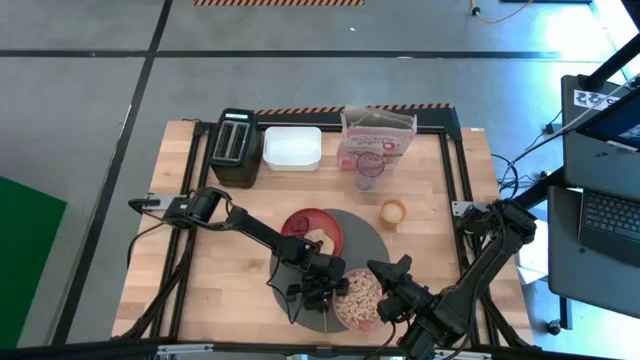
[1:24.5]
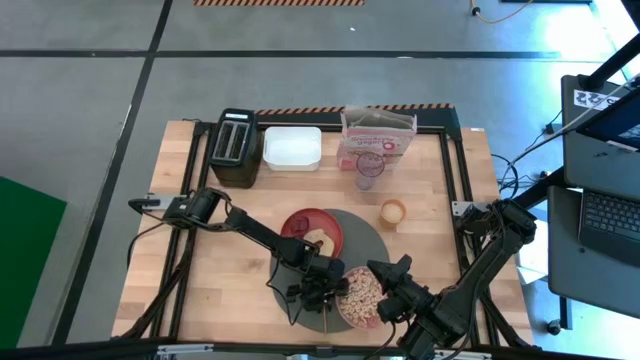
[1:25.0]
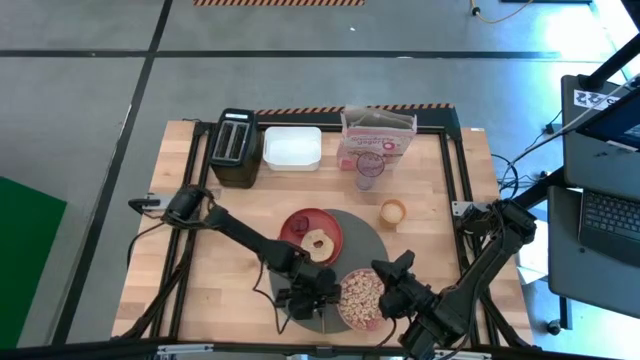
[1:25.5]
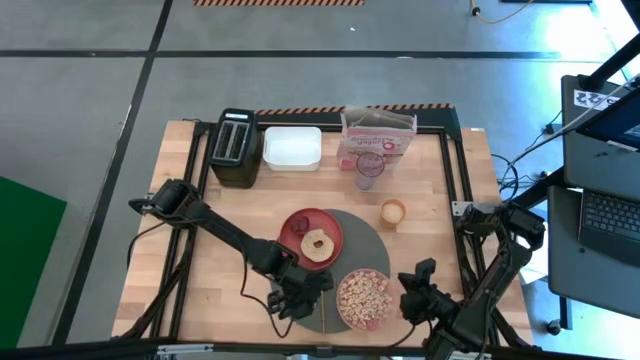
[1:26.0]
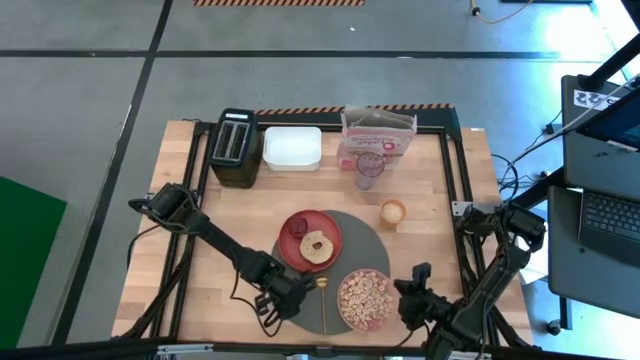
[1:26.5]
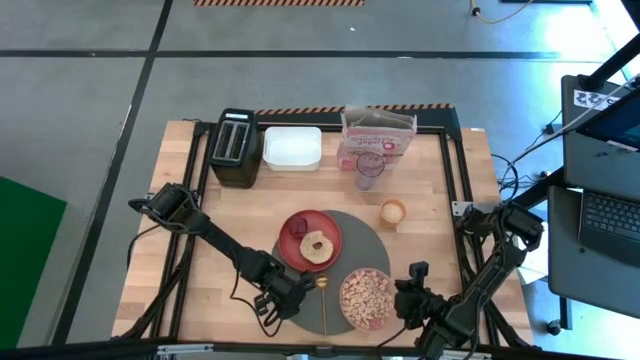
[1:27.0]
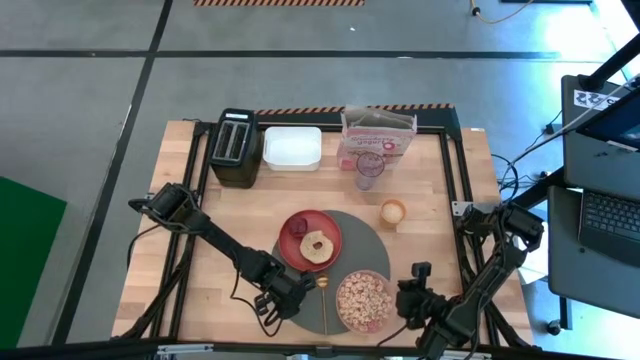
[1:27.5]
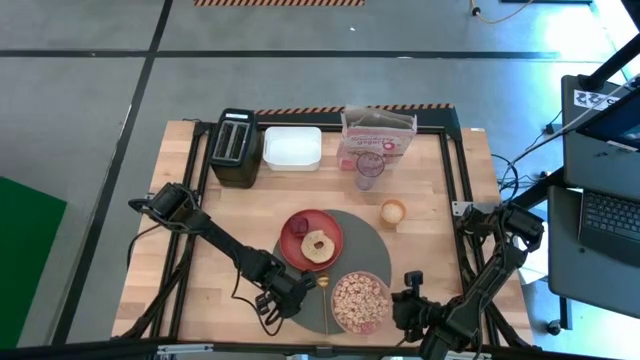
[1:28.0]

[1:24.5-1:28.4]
Task: Arrange a breakfast setting
Adjust the pink bowl on the gray place mat

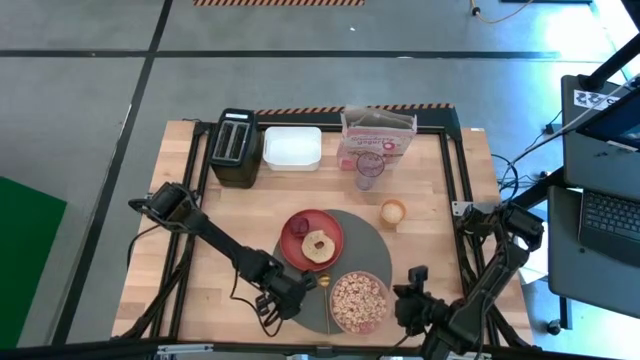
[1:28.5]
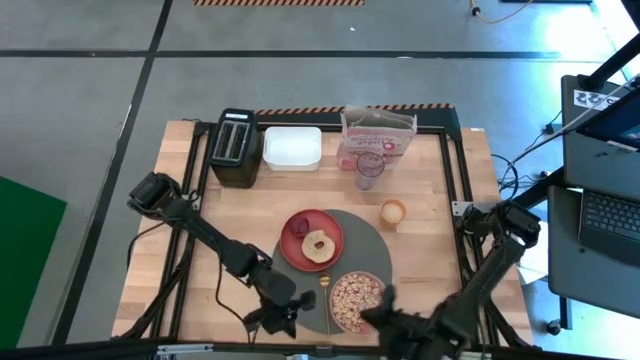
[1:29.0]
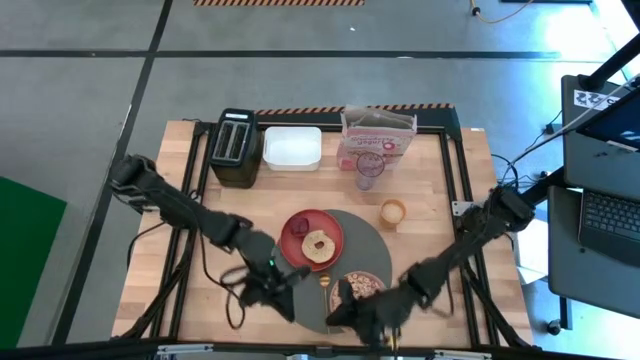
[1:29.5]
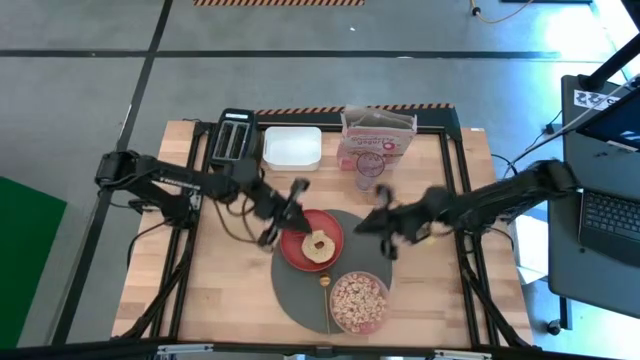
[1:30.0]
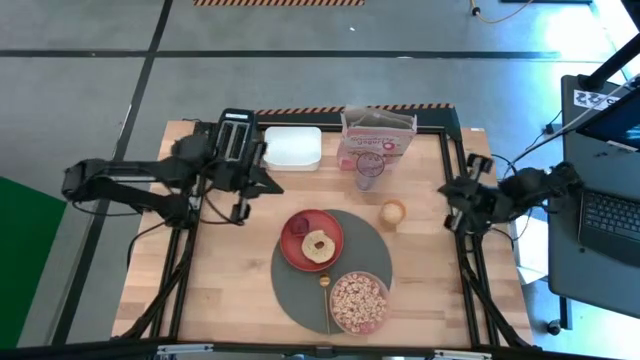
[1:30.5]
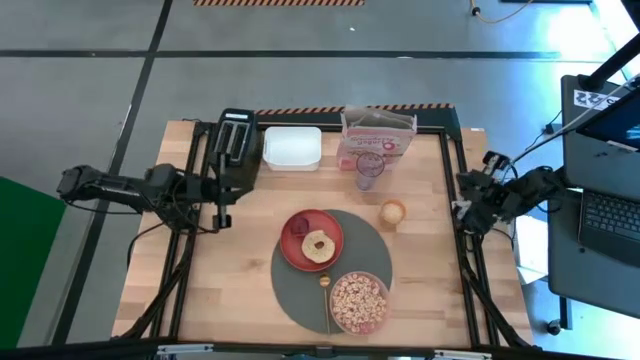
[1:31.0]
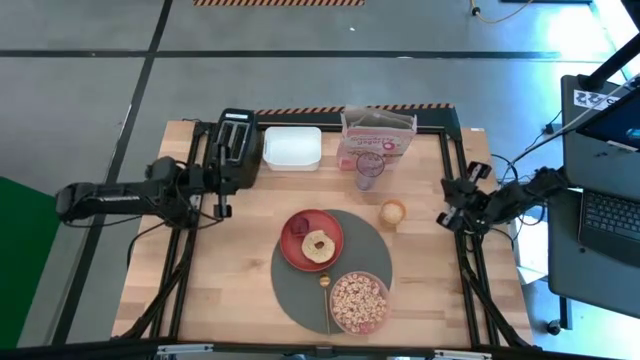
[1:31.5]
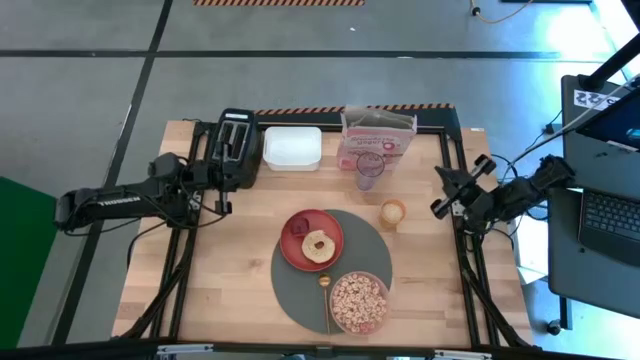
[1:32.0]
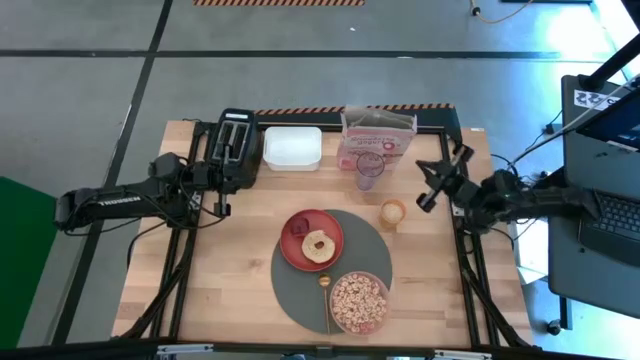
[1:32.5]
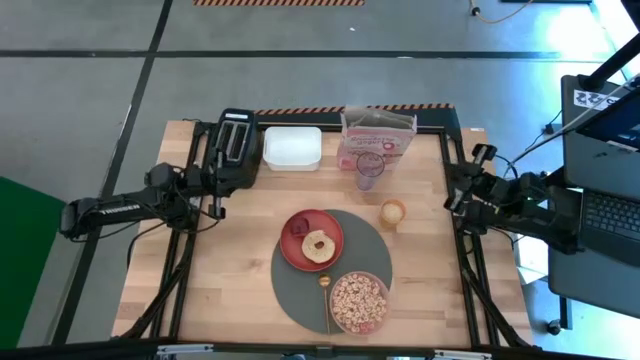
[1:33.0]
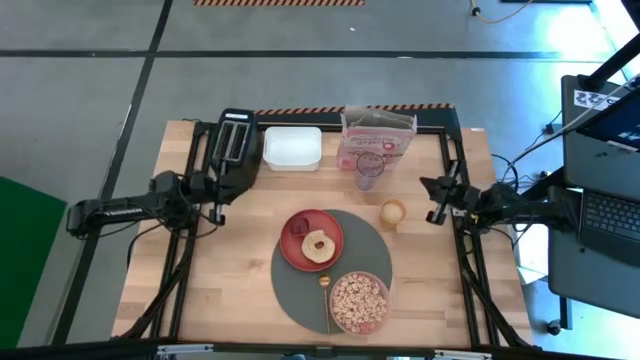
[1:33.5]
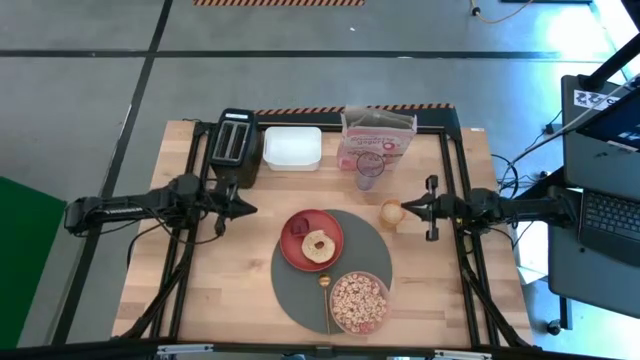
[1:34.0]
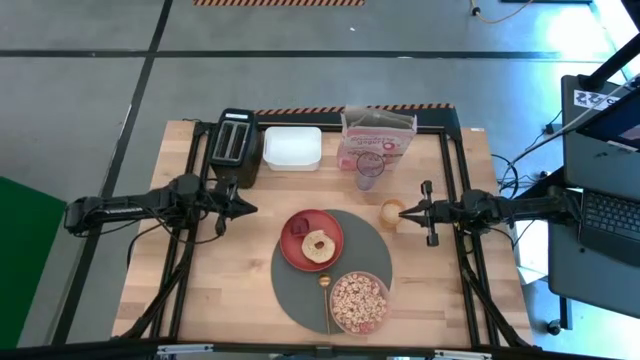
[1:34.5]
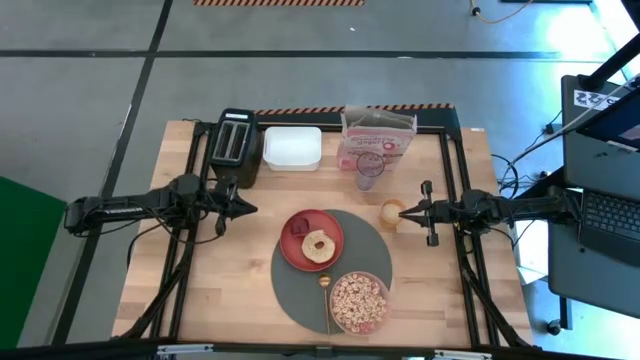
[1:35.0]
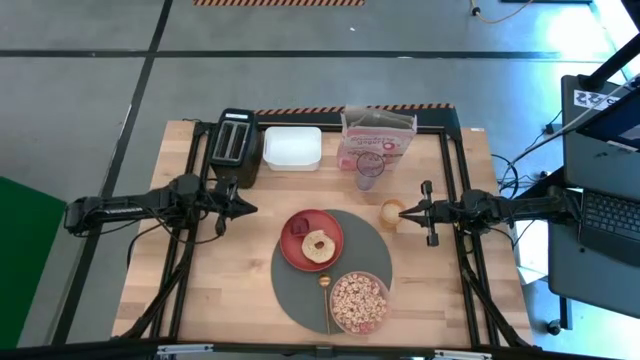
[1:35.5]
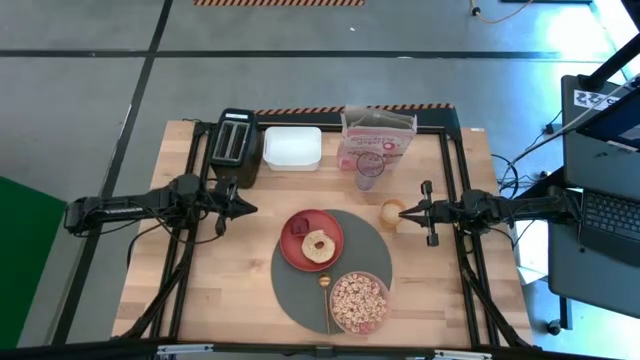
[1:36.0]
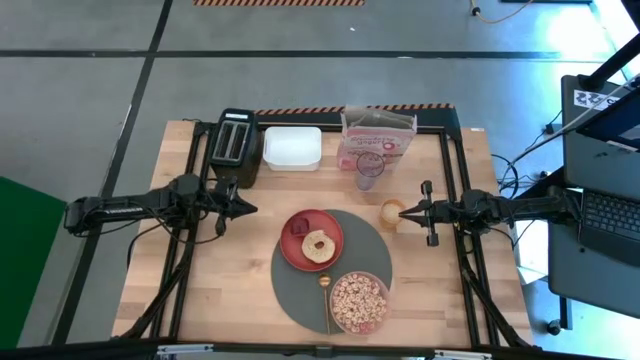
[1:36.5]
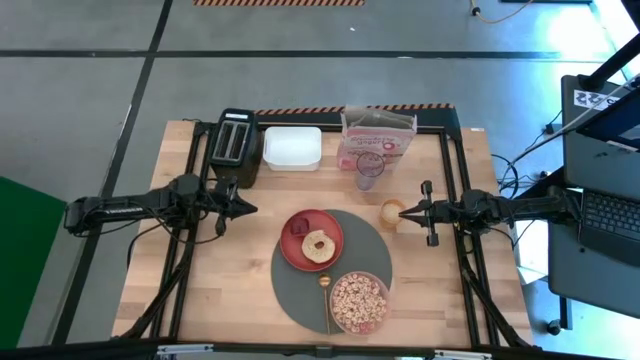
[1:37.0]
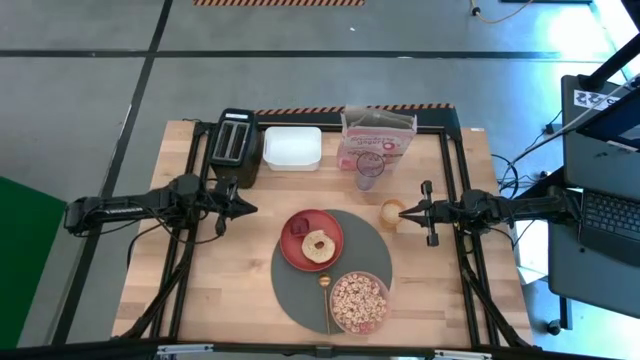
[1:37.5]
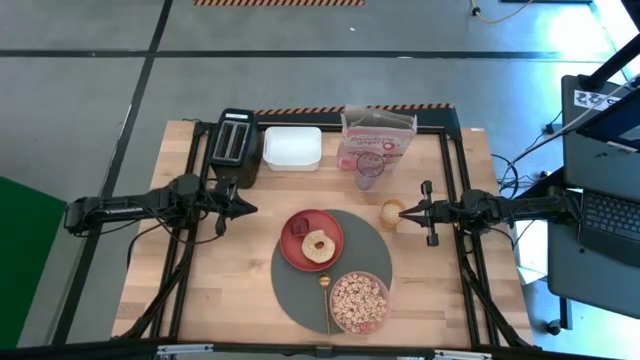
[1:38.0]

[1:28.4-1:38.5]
Return to Home Position

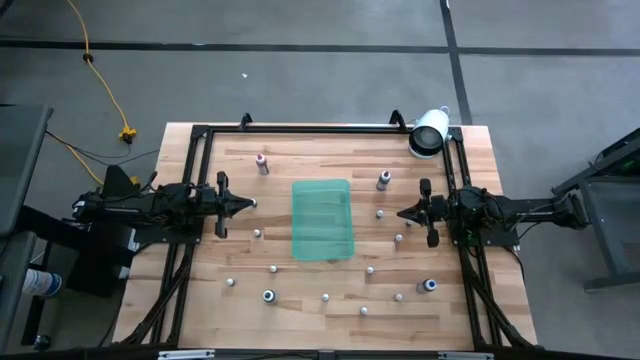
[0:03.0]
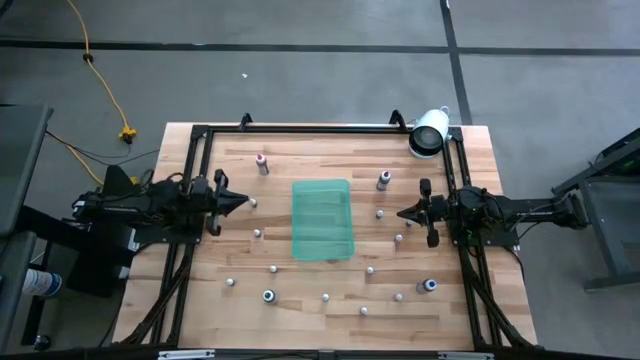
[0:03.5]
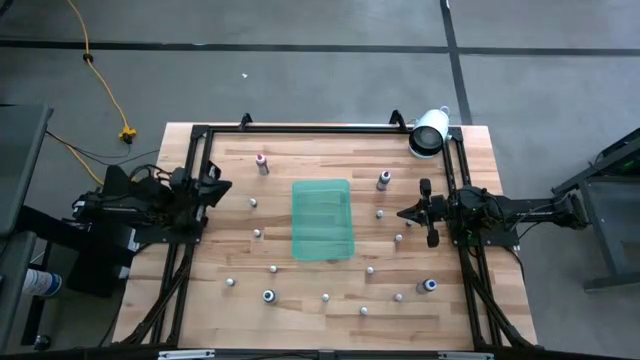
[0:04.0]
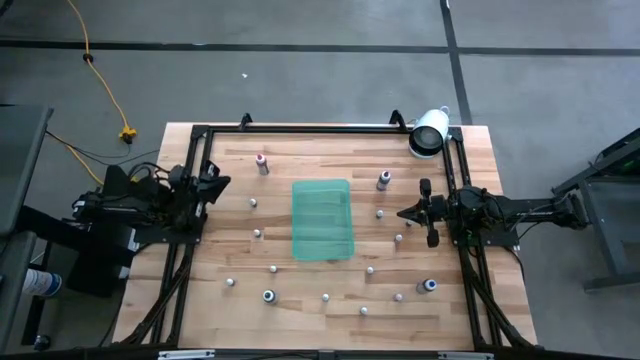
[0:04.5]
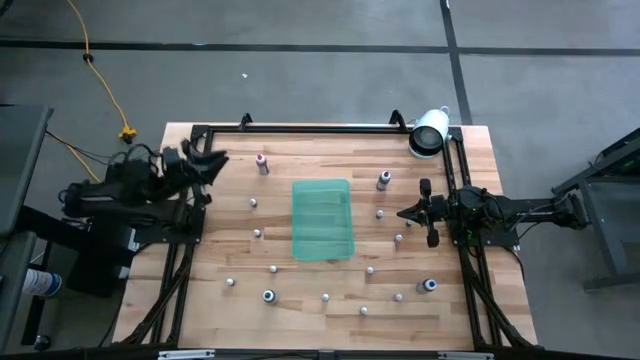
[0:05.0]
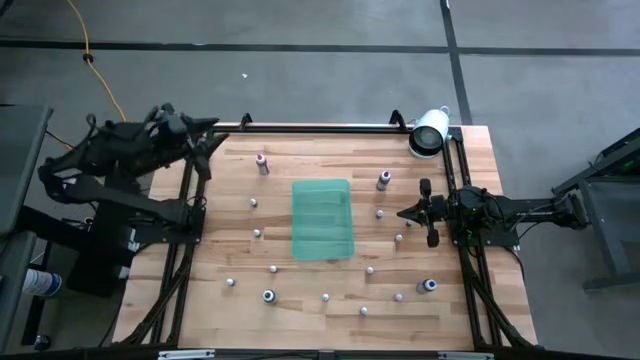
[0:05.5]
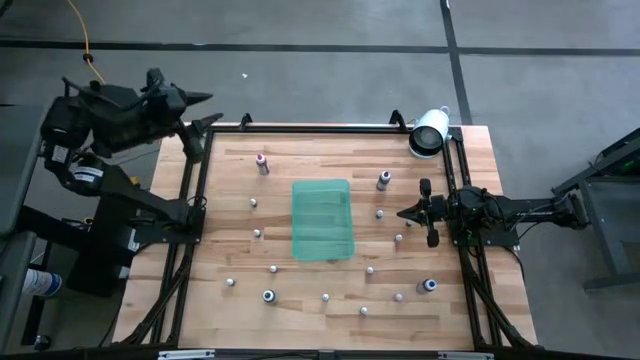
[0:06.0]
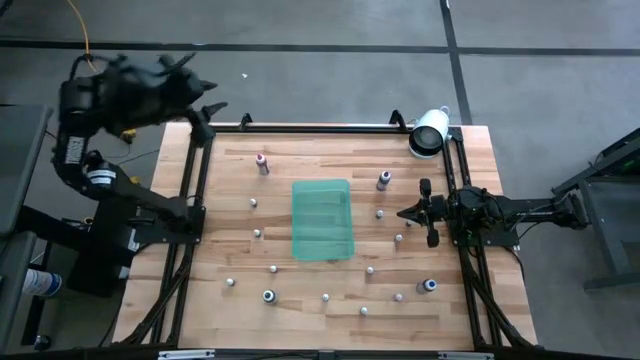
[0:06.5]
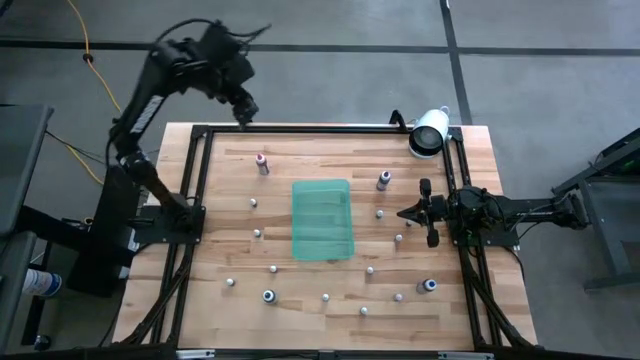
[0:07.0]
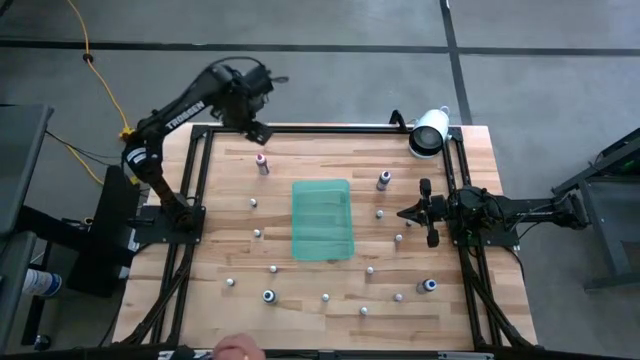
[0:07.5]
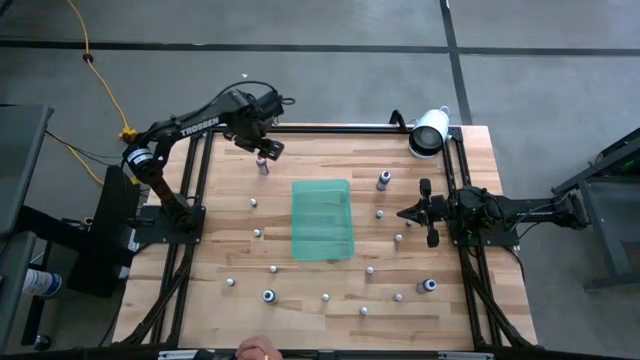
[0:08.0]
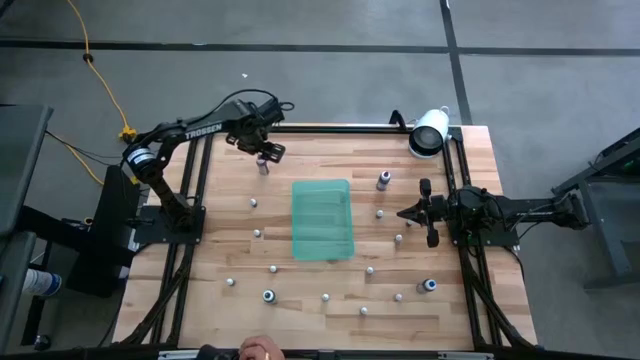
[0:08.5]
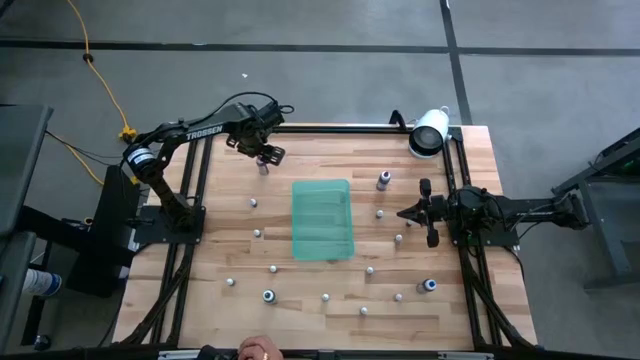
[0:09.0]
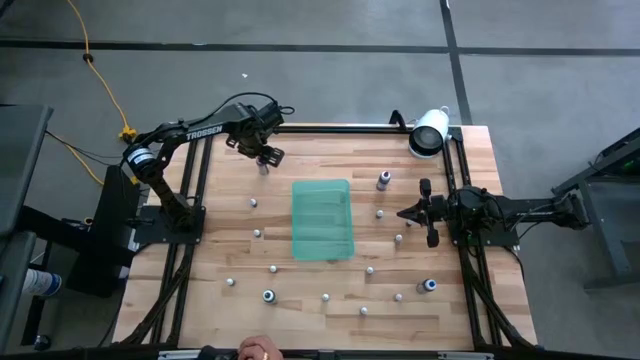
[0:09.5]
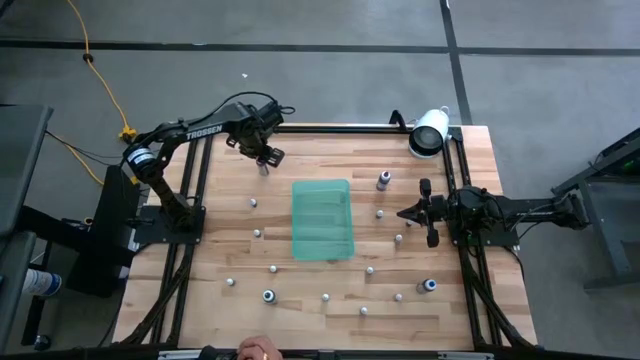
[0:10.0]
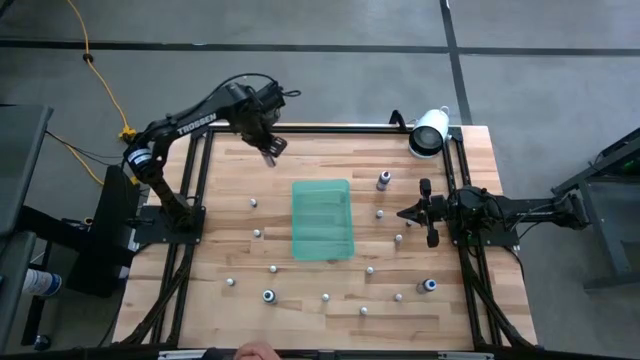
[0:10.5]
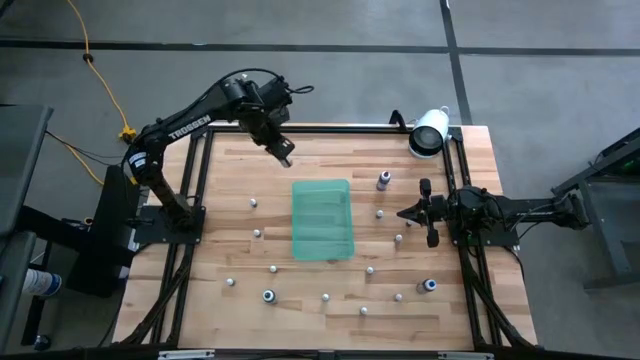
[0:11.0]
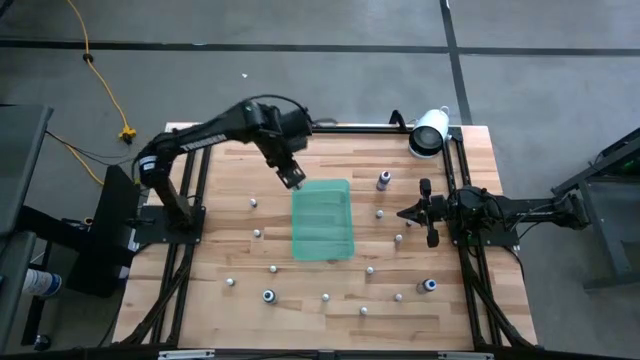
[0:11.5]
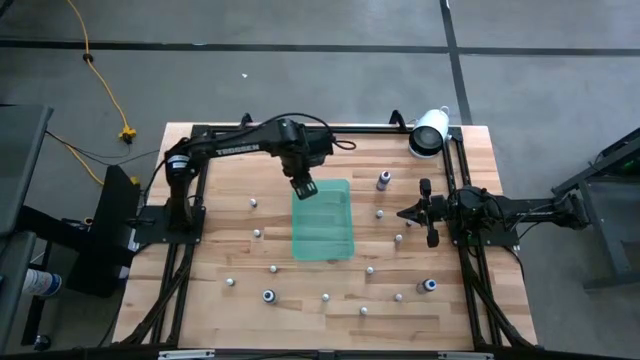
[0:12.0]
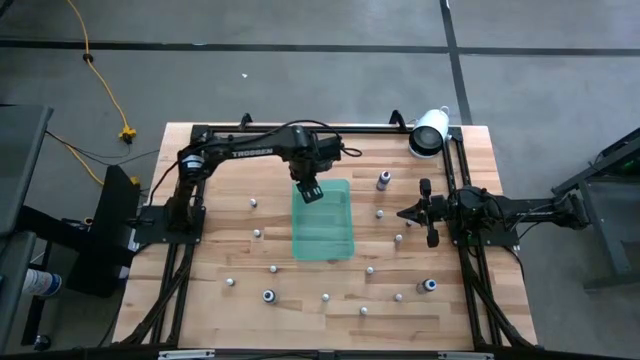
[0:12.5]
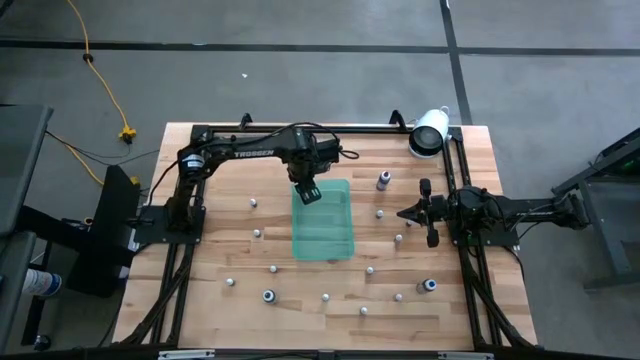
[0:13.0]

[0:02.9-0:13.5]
Task: Pick & Place food coloring
Put the big pink food coloring bottle into the green bin
